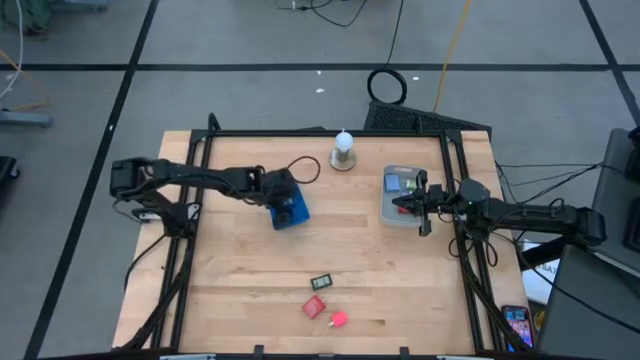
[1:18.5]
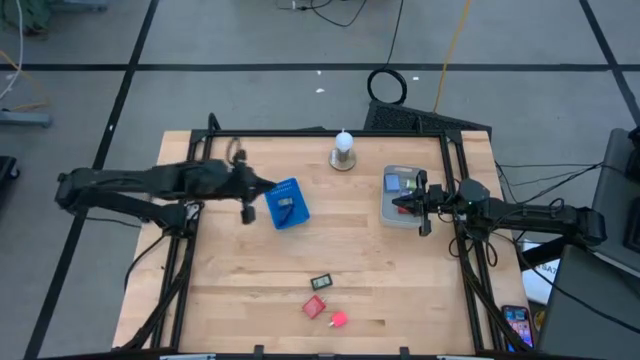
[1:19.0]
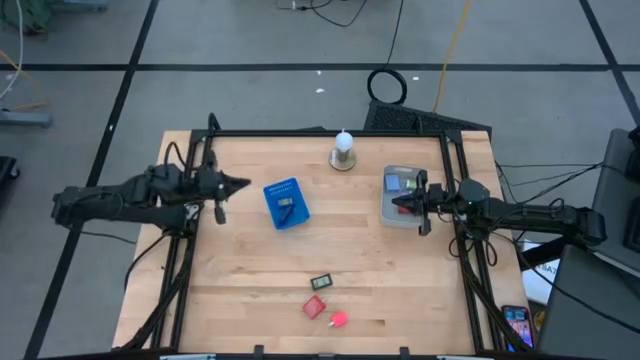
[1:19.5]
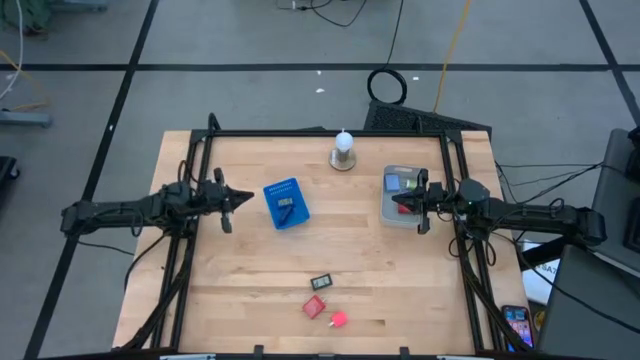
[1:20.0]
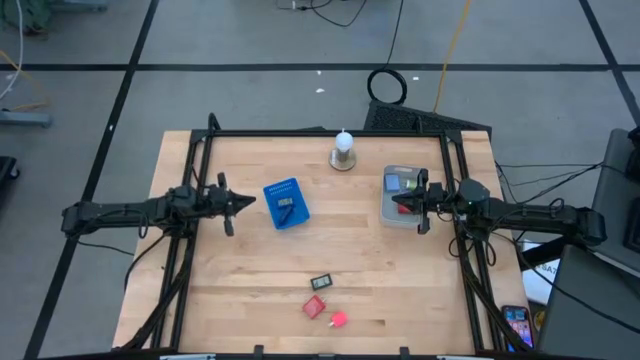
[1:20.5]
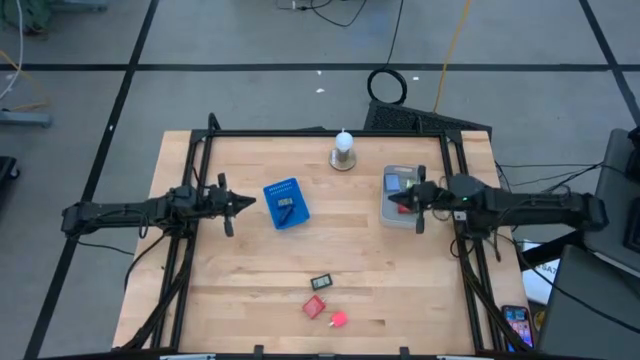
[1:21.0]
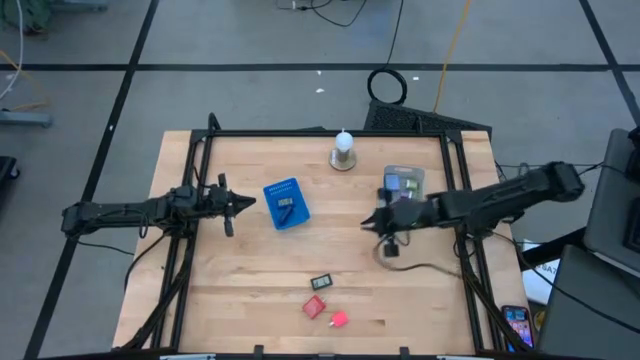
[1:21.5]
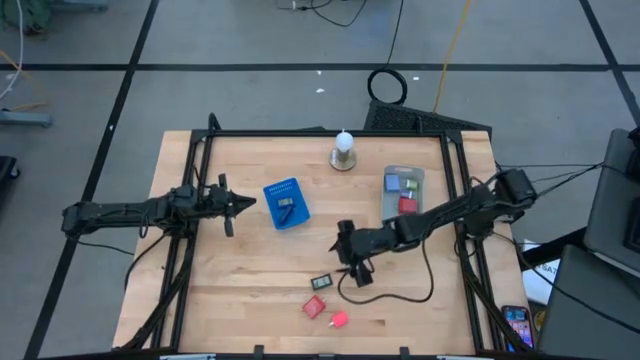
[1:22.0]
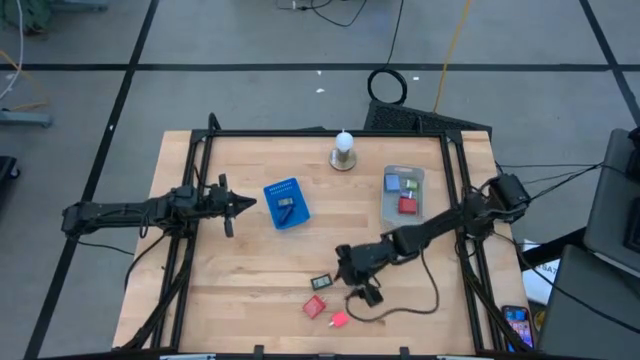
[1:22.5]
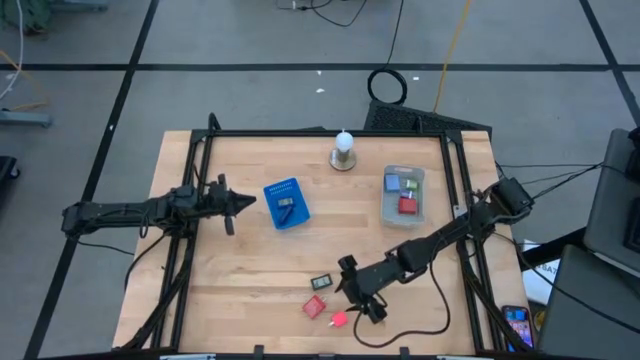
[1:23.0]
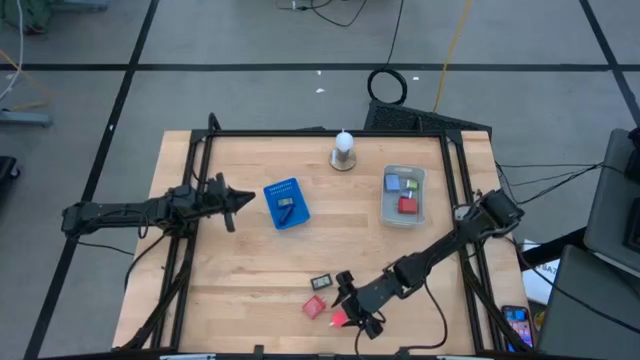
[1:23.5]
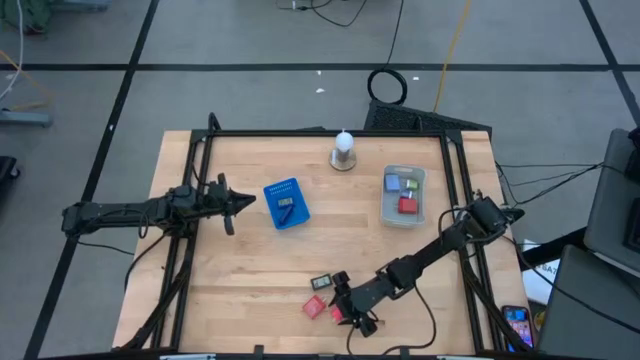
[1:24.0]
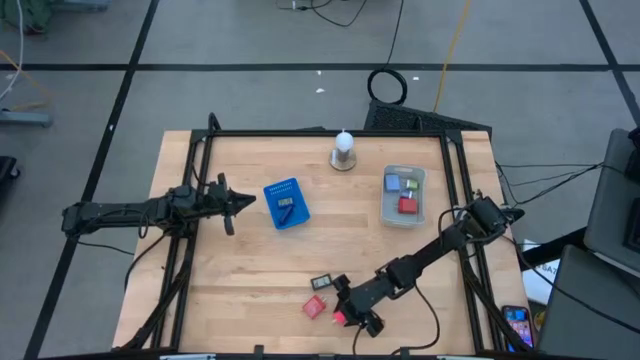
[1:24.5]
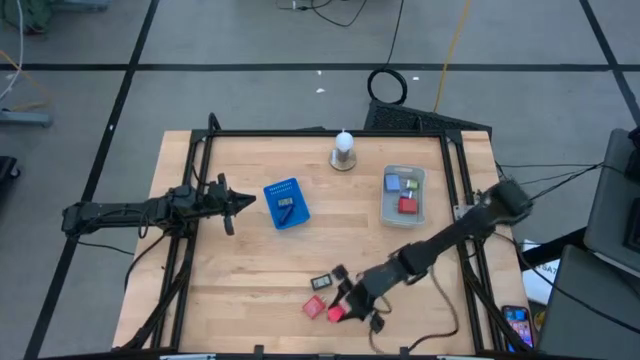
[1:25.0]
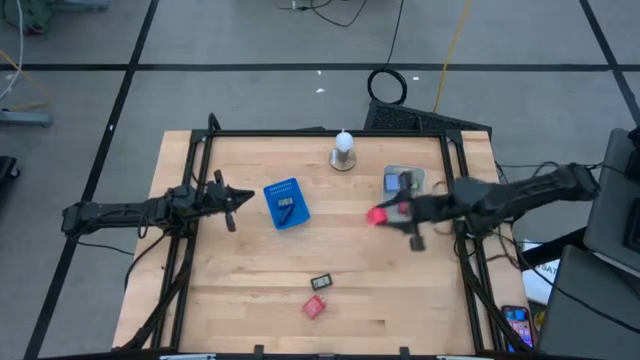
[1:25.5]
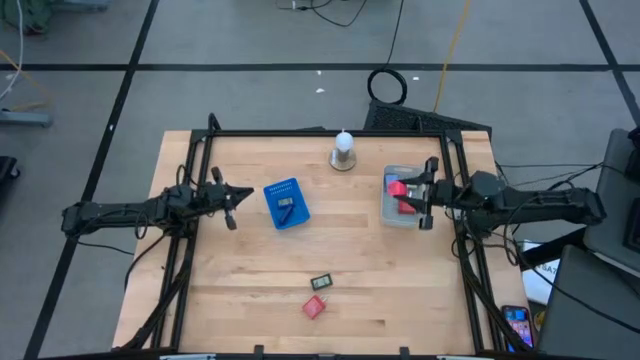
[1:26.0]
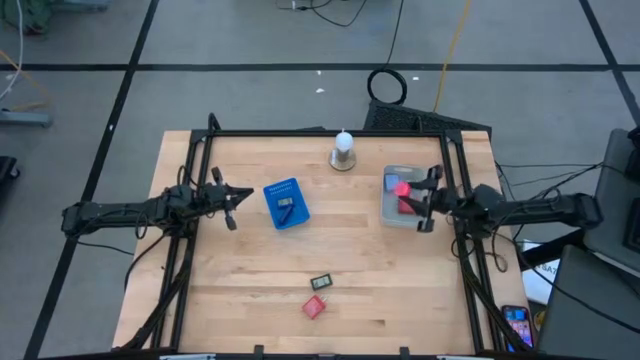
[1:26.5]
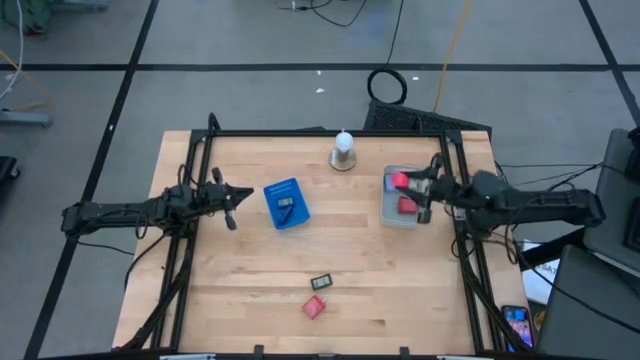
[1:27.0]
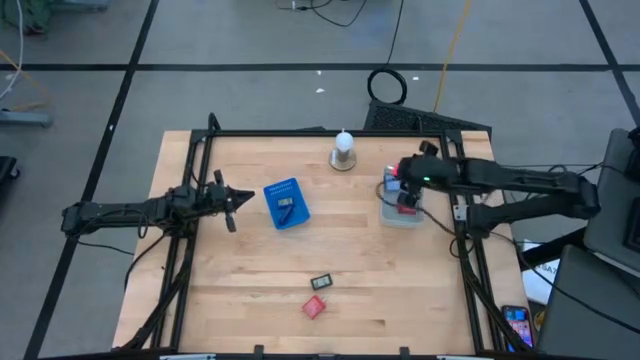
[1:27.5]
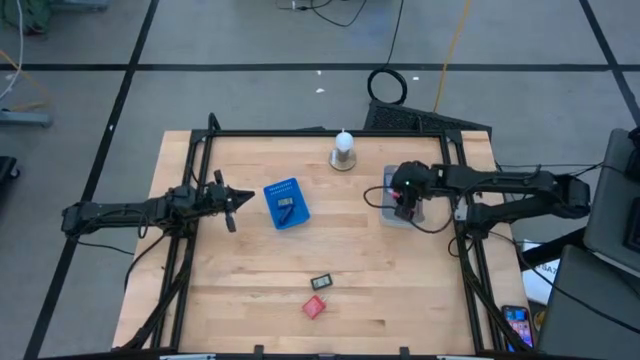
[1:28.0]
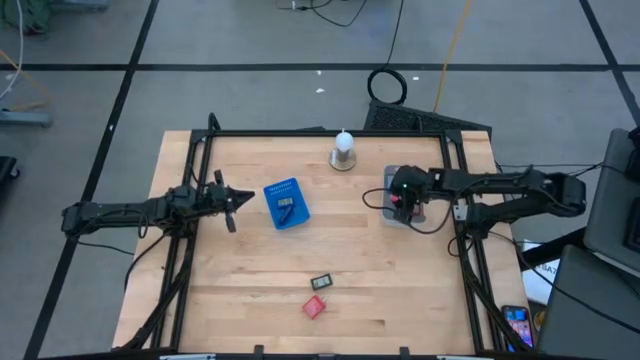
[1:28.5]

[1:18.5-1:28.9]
Task: Pick & Place Office items
Put the pink charger adapter into the gray bin

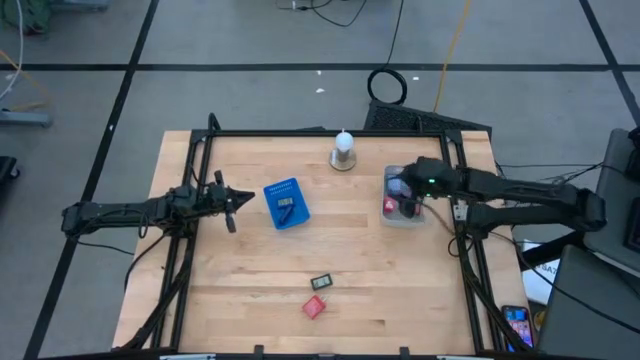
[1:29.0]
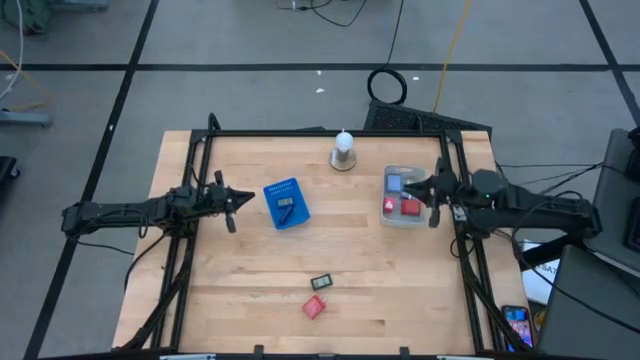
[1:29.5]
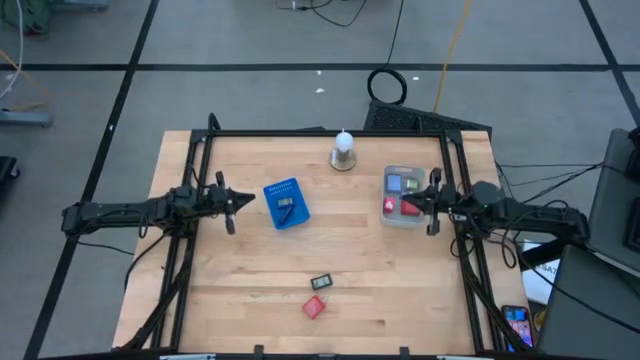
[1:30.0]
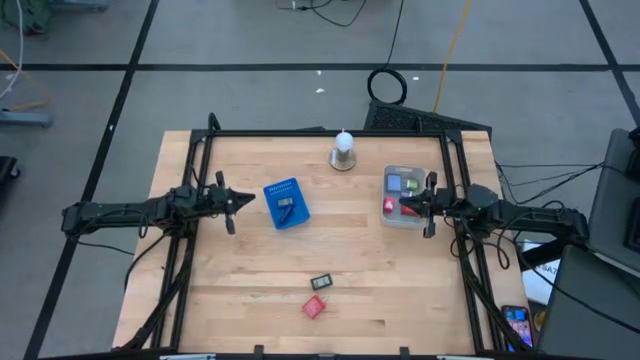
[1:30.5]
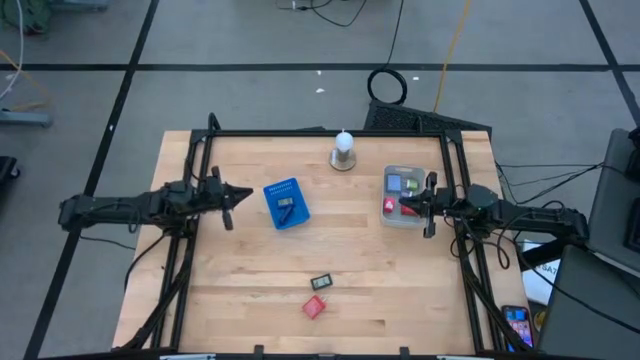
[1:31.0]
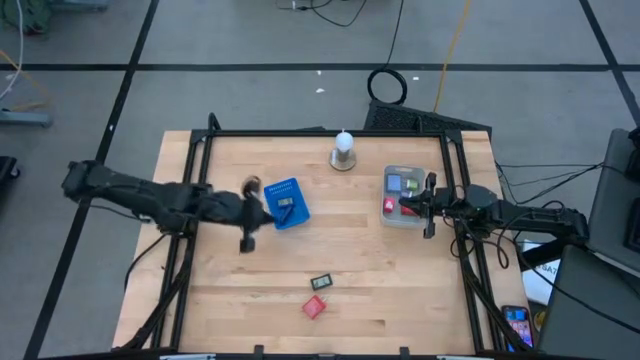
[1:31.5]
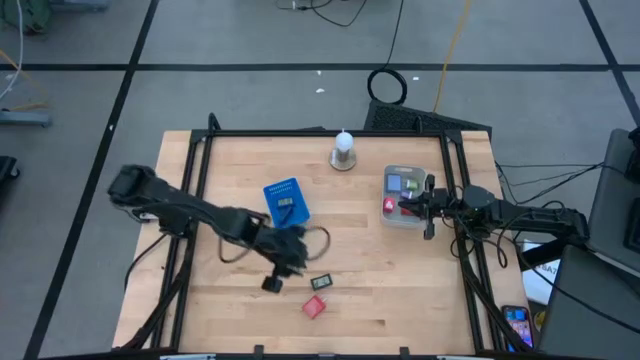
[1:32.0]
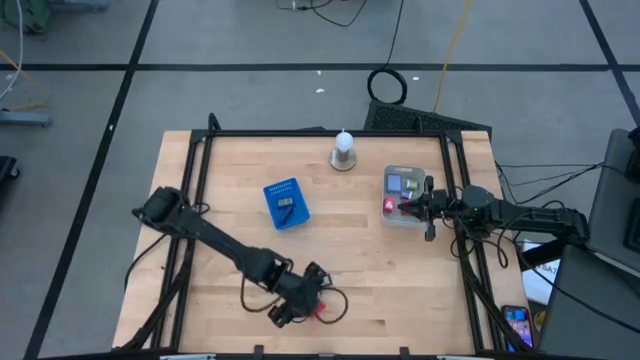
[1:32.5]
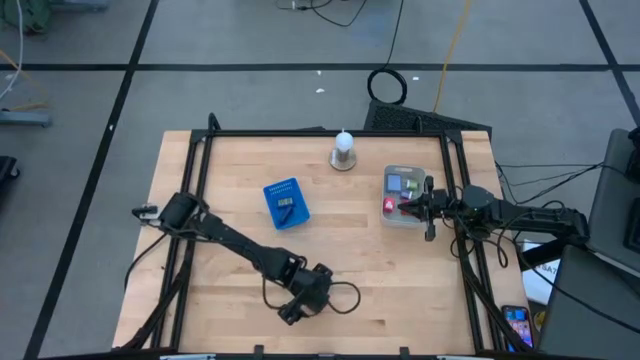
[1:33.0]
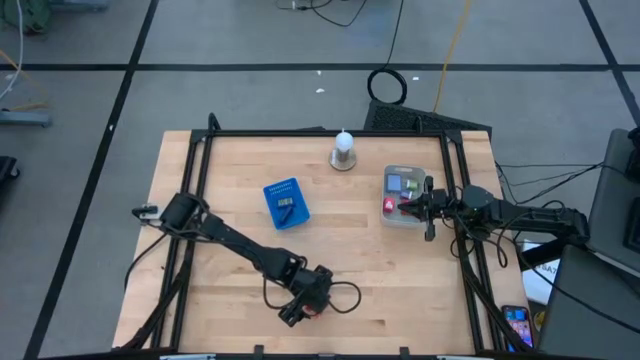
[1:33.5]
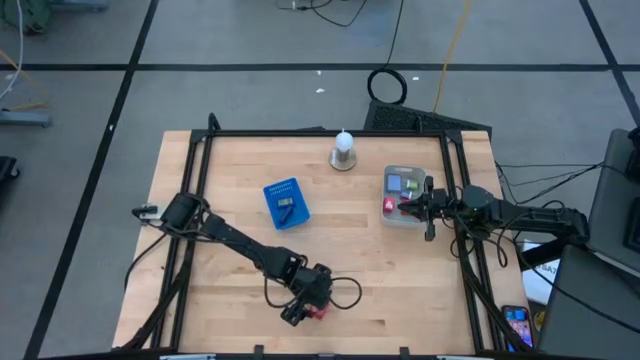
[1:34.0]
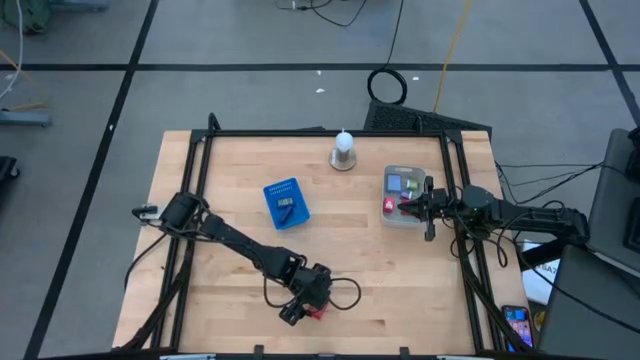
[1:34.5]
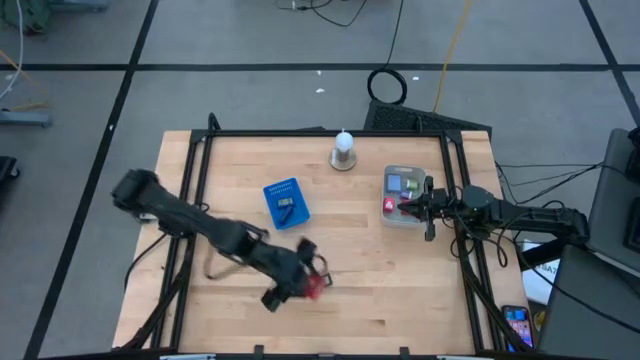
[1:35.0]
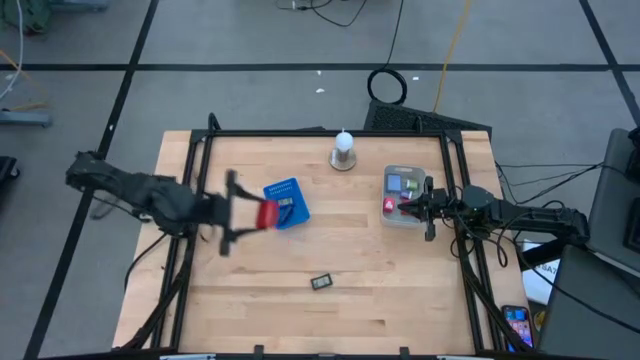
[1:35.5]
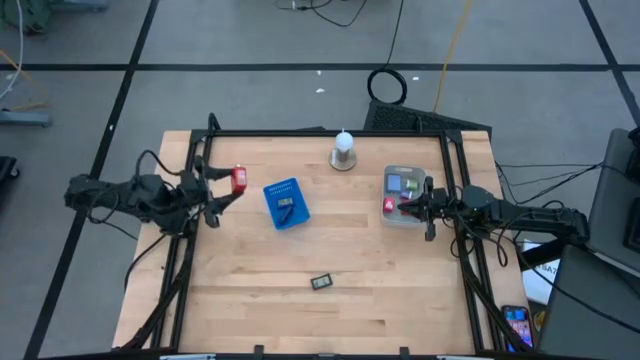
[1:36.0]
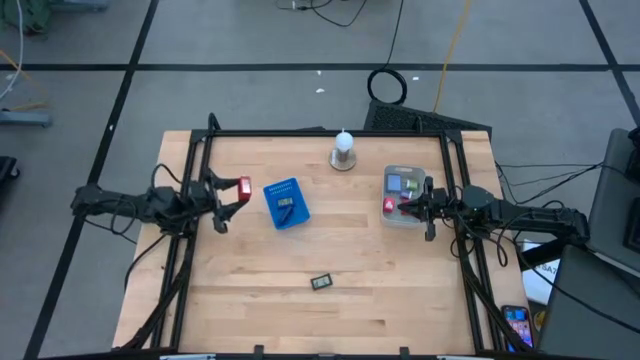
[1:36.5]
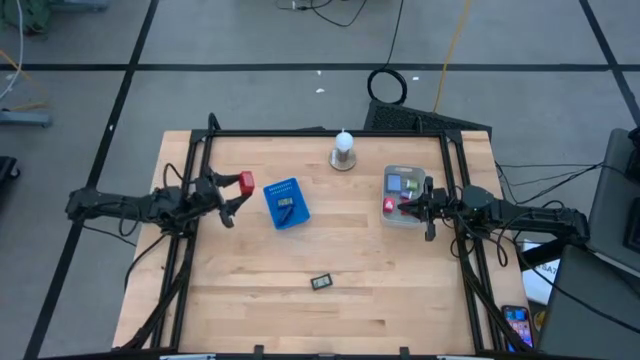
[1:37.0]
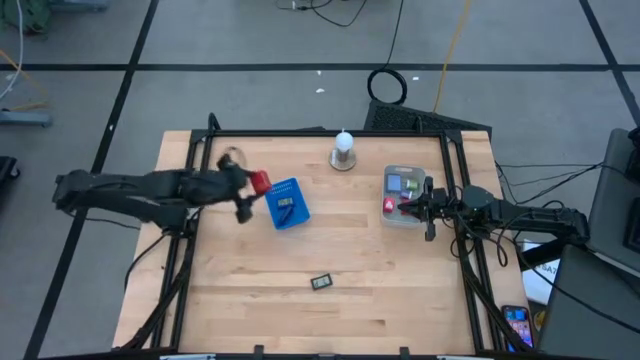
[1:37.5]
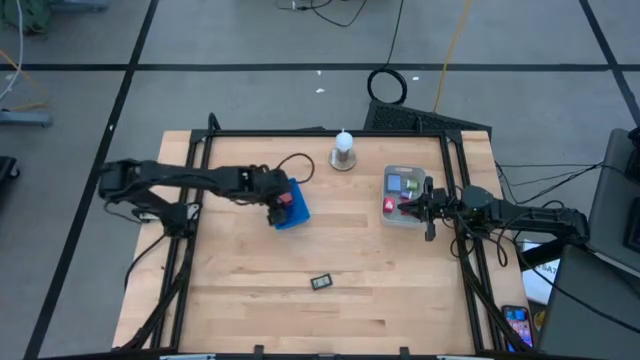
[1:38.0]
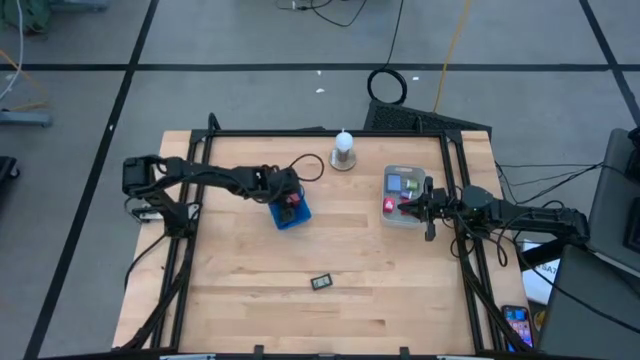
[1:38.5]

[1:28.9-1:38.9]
Put the red charger adapter into the gray bin

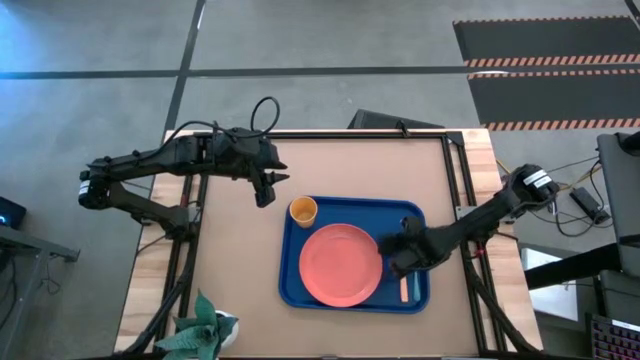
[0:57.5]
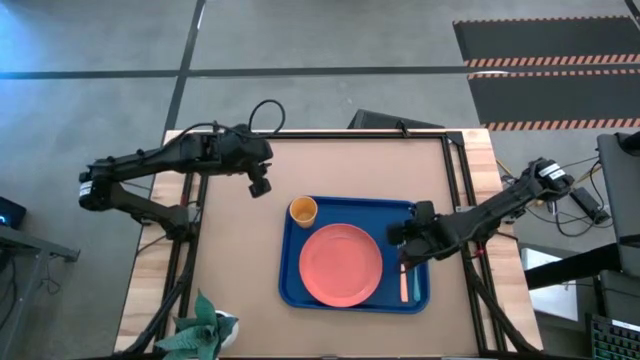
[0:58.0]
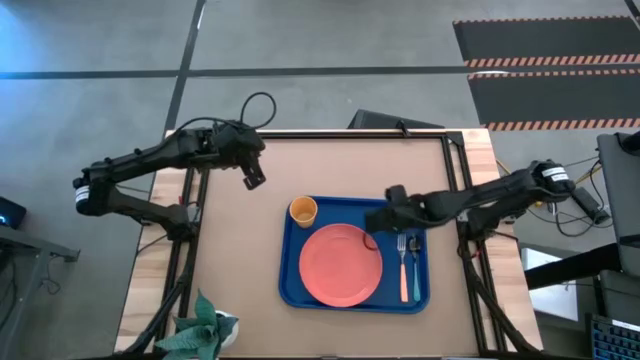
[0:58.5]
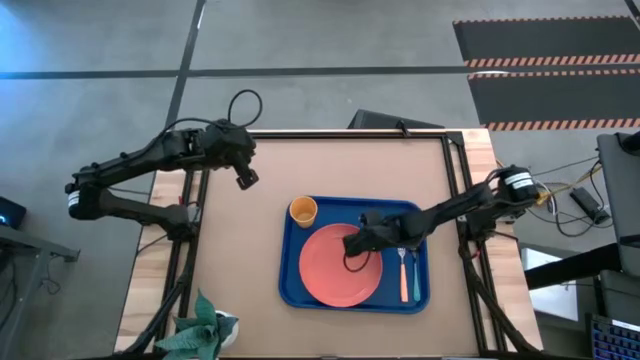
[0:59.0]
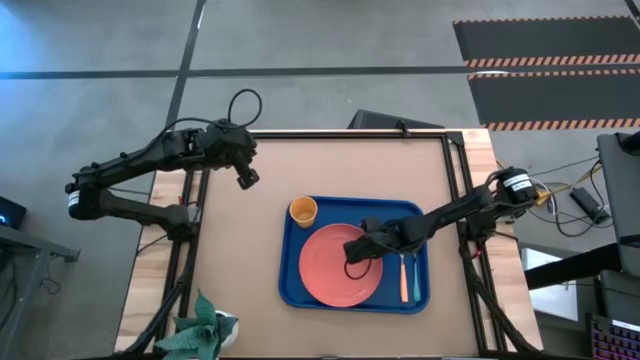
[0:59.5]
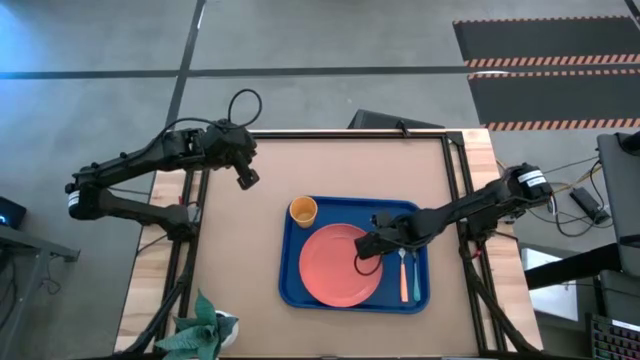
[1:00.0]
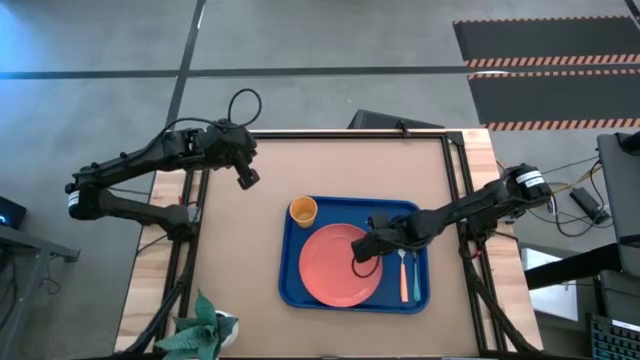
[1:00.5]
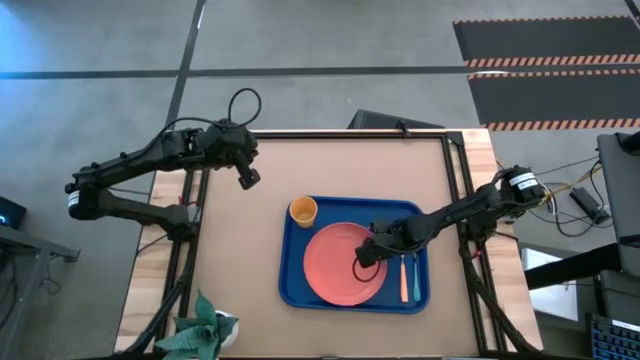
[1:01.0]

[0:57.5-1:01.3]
Task: Pick and place plate/cup/fork/spoon on tray
Adjust the orange plate to the center of the blue tray
